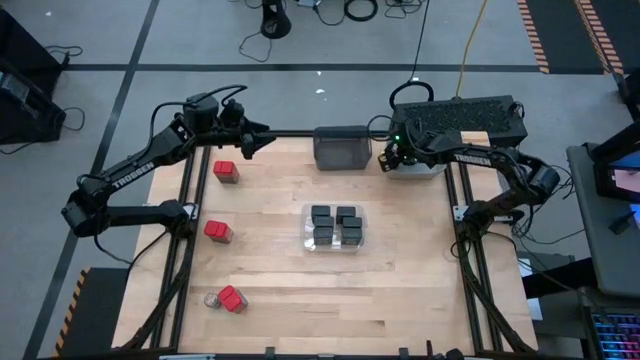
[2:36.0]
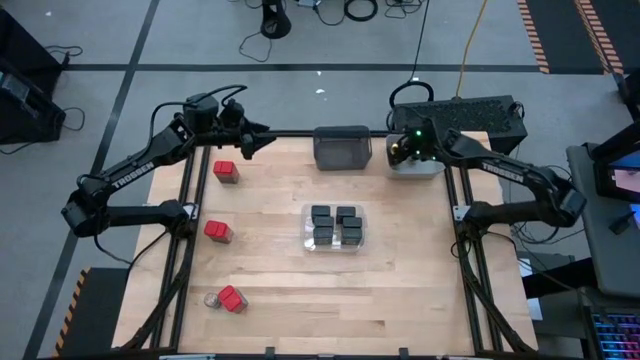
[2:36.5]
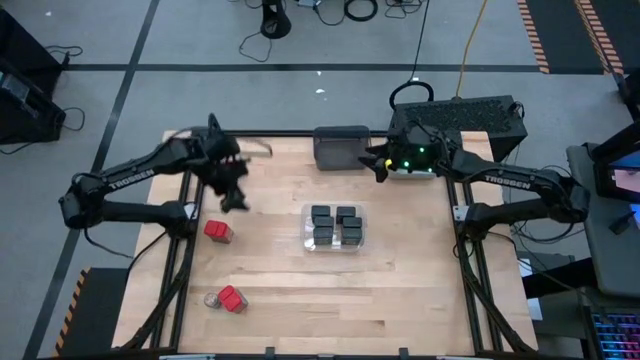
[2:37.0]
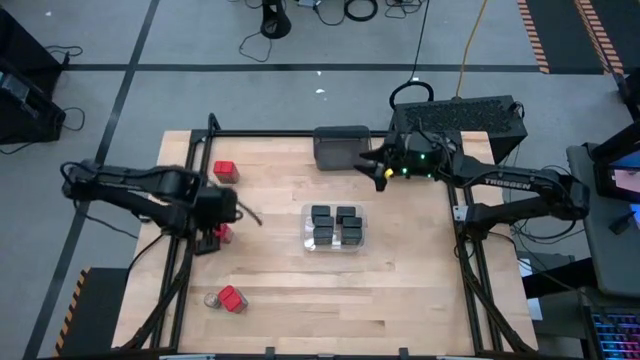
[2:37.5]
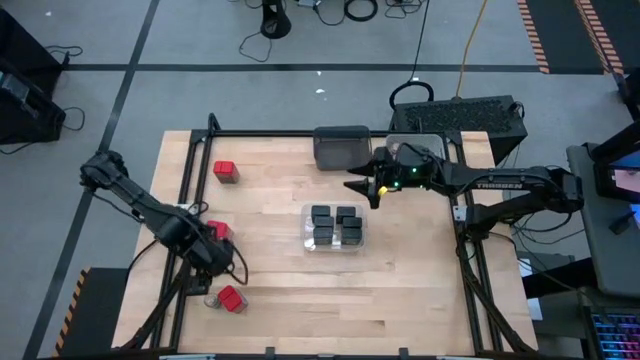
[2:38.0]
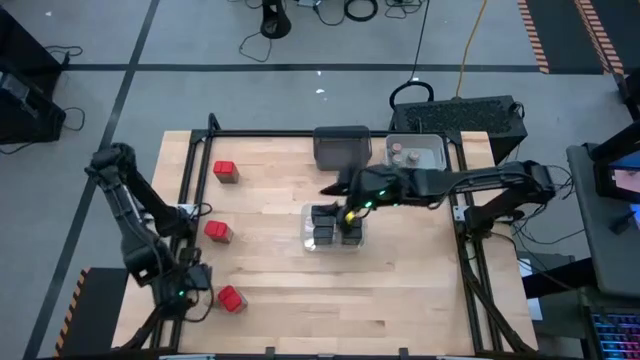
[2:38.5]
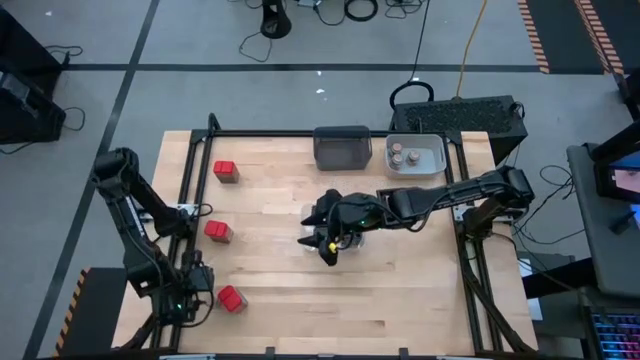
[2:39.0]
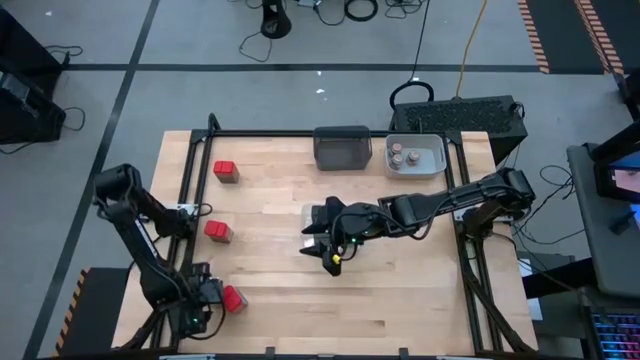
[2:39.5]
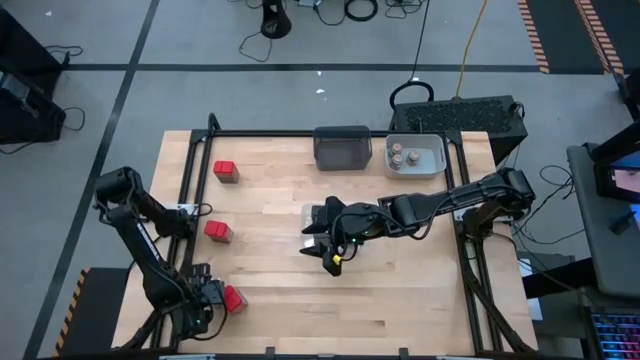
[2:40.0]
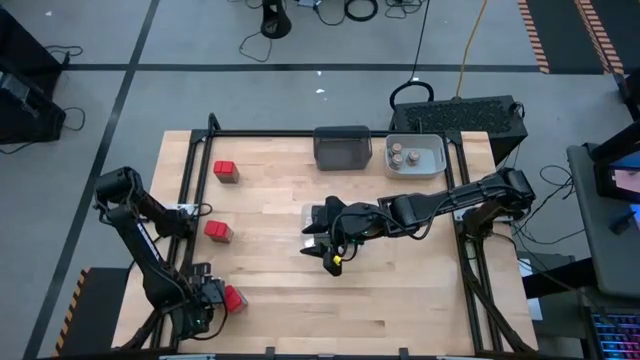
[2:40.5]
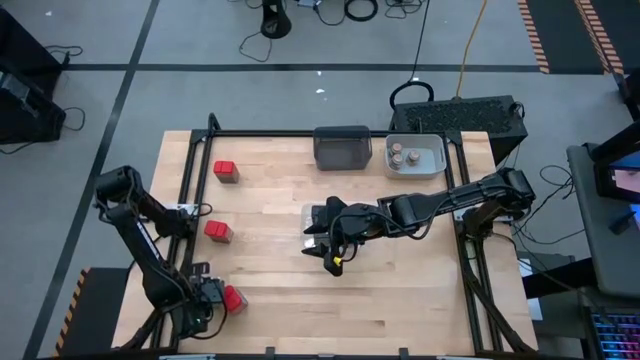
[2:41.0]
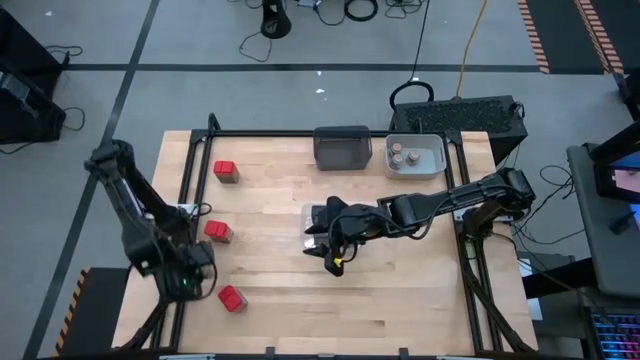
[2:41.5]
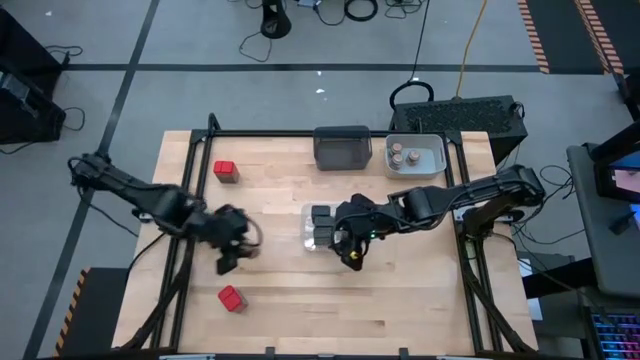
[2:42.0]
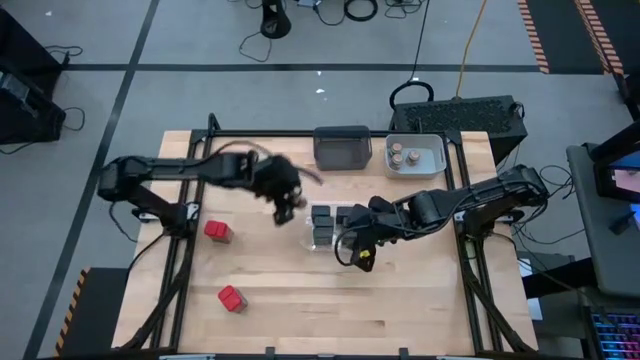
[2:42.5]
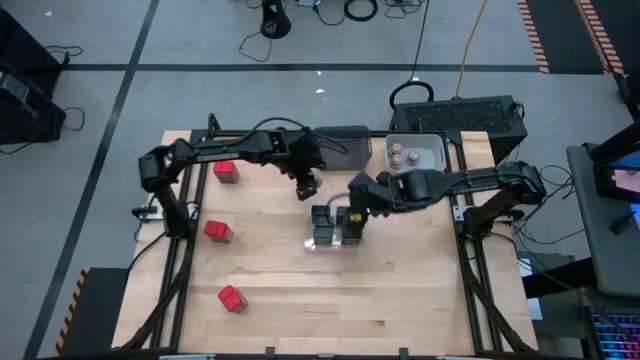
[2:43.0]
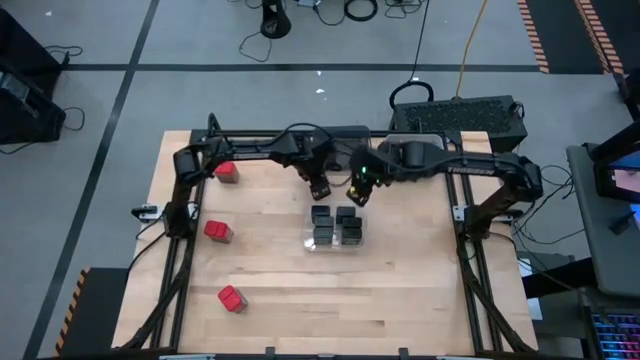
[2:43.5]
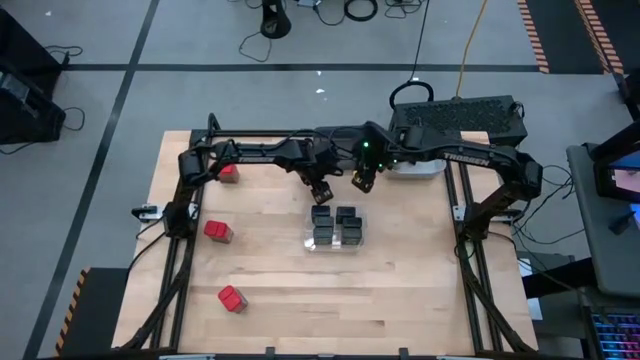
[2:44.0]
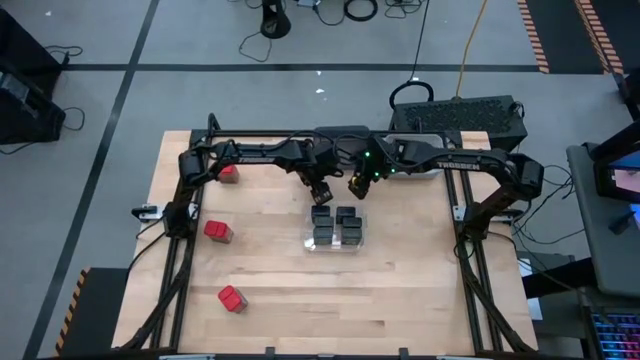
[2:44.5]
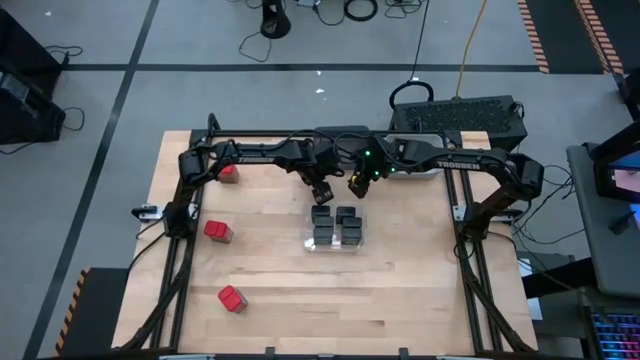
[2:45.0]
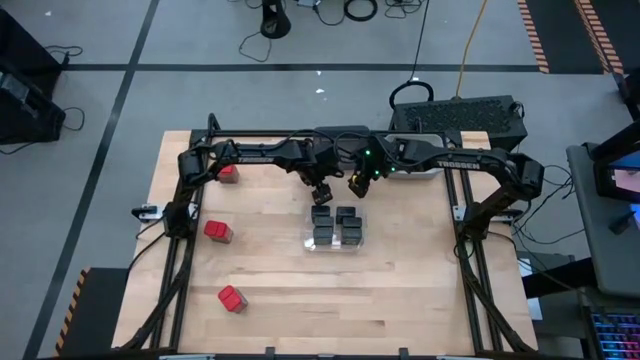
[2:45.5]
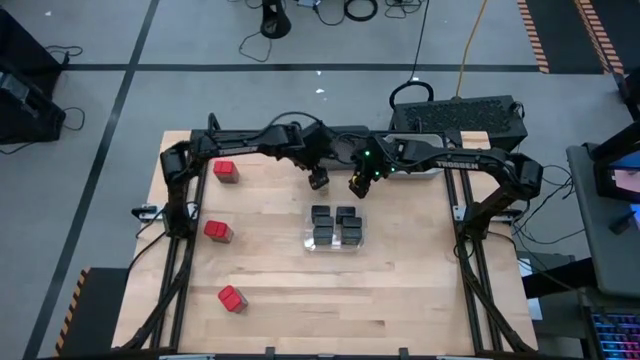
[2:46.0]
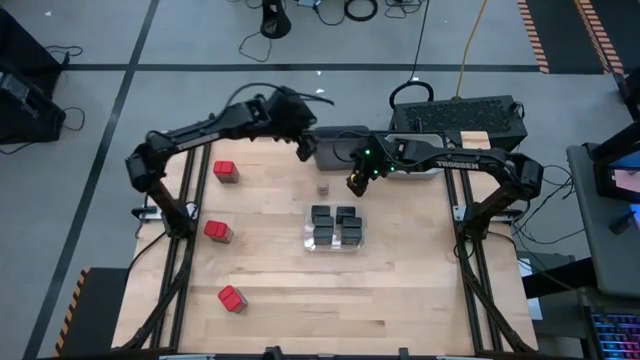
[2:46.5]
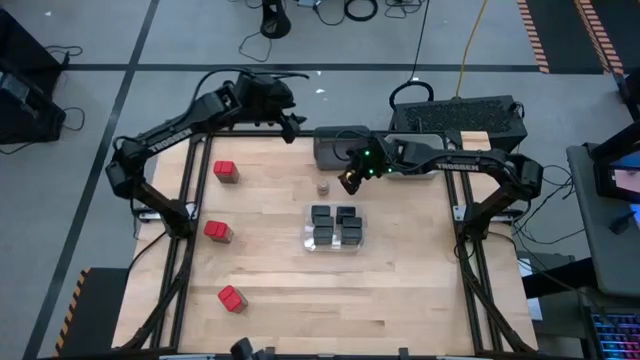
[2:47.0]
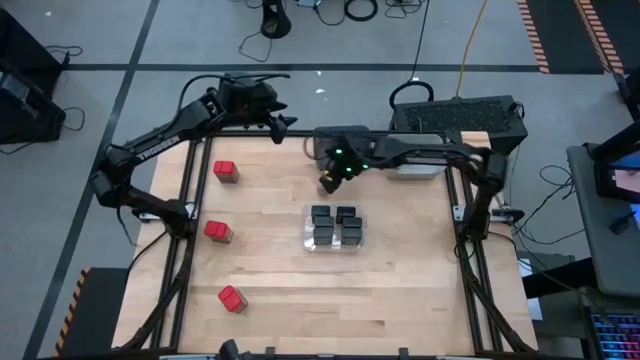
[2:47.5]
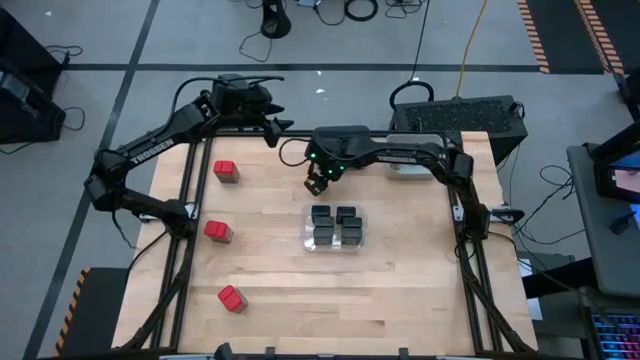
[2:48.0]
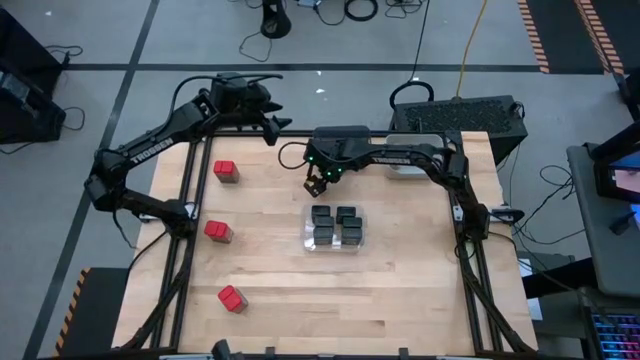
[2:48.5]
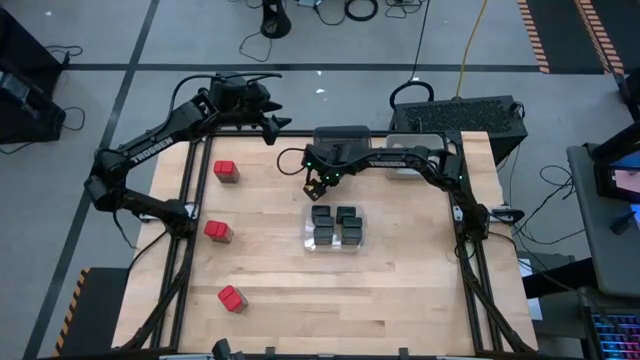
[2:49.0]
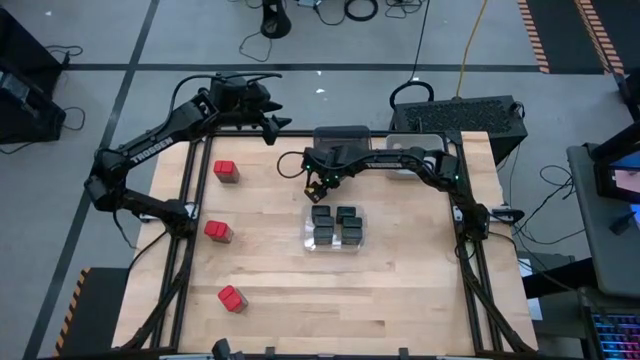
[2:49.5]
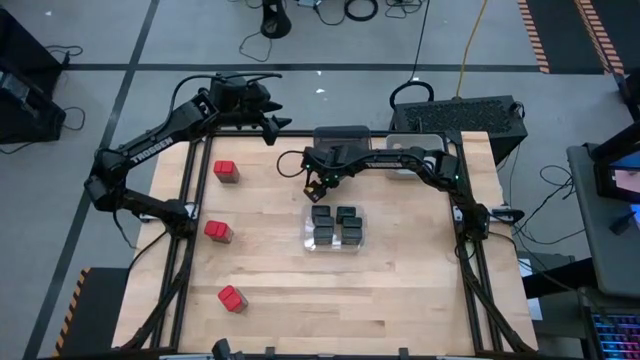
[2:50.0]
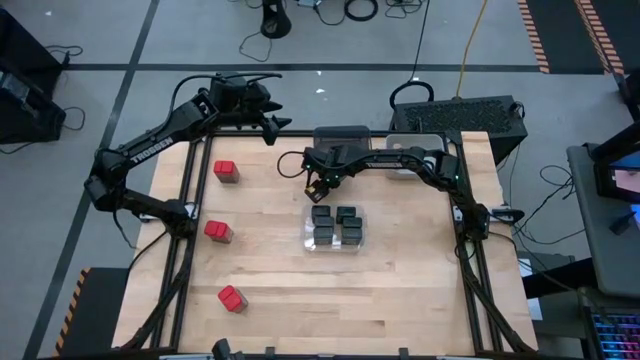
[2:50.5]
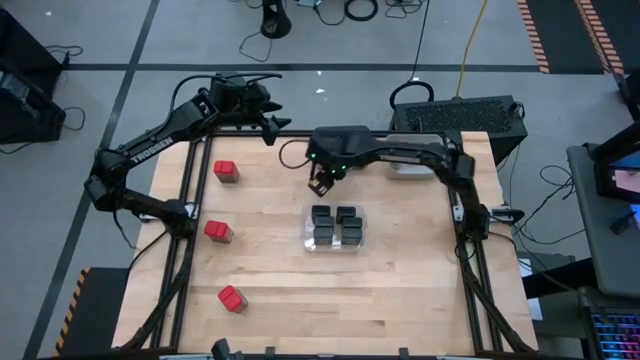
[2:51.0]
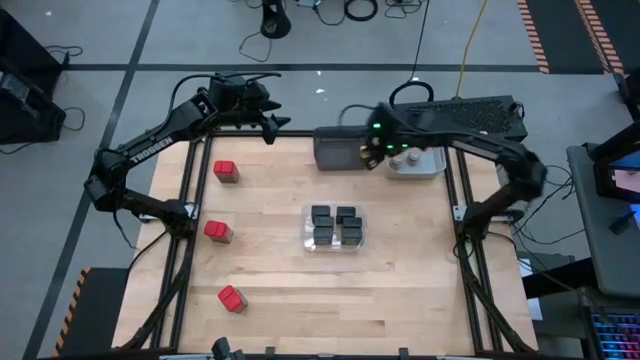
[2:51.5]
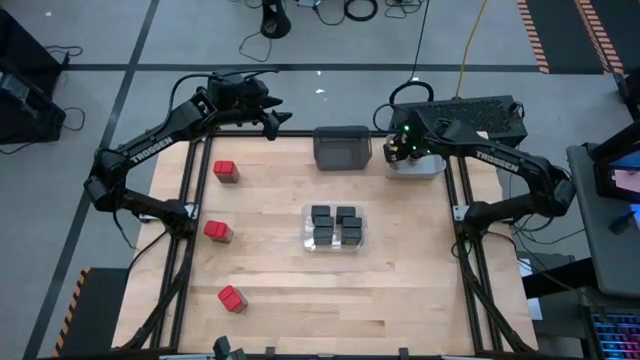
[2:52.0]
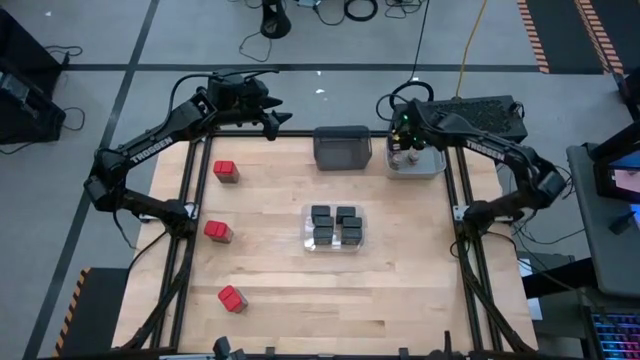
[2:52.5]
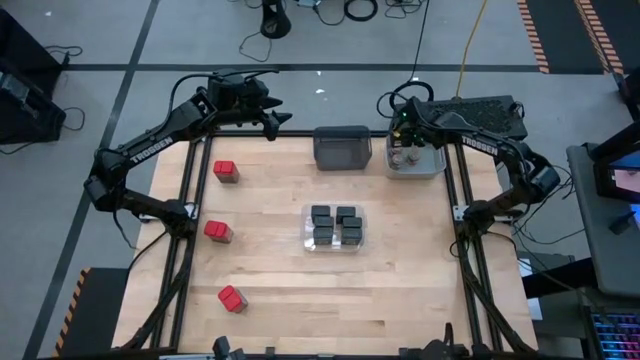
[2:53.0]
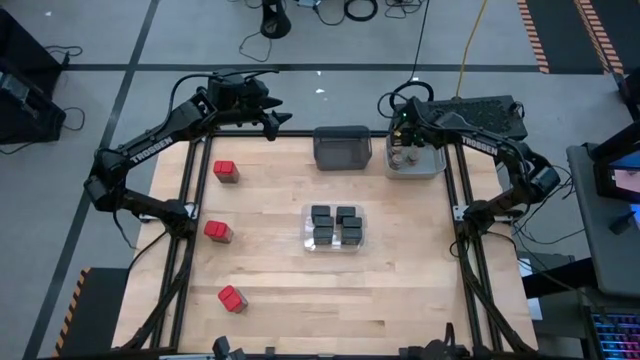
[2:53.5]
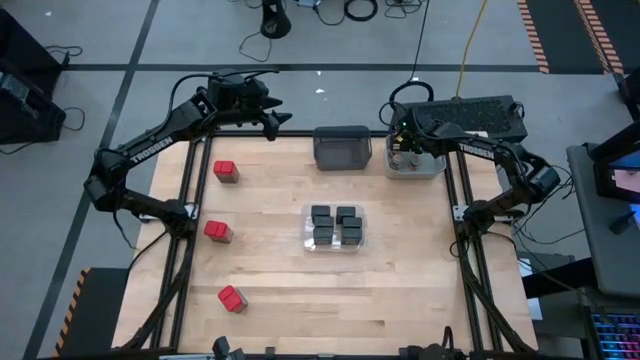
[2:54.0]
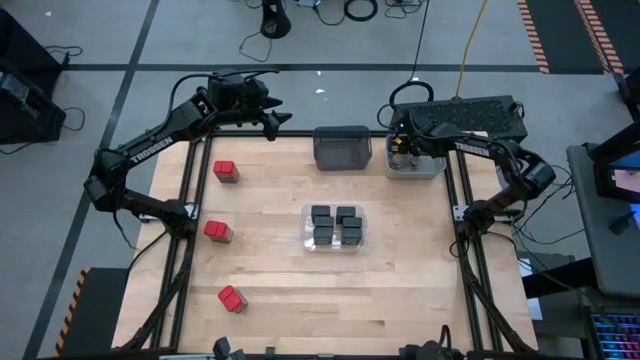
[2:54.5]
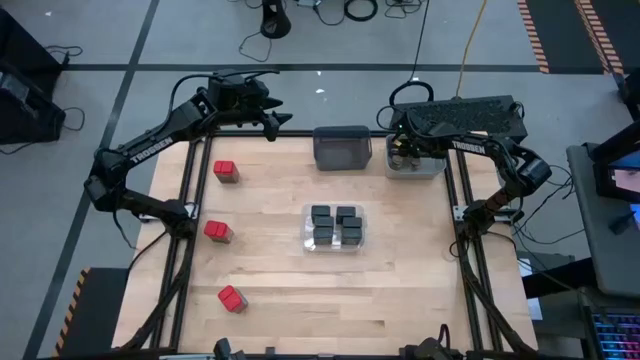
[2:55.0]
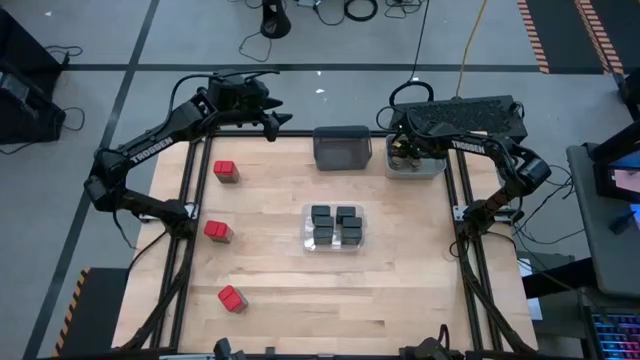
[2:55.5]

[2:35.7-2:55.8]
Task: Sort spices by type
Put the brown seasoning into the gray bin

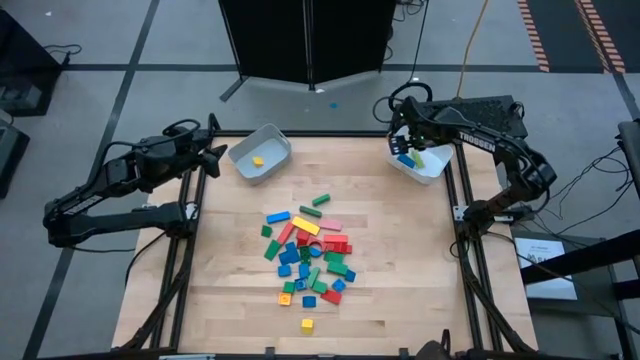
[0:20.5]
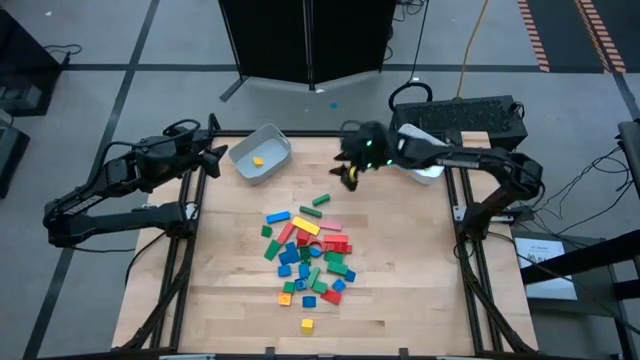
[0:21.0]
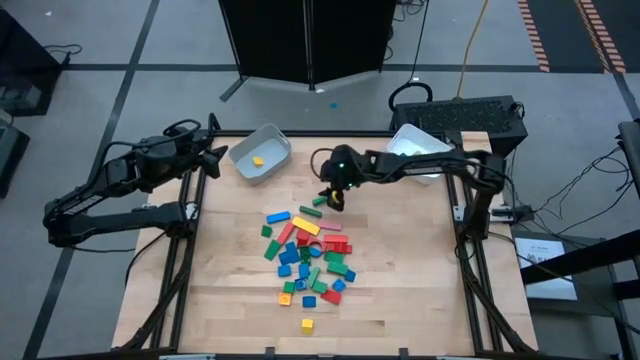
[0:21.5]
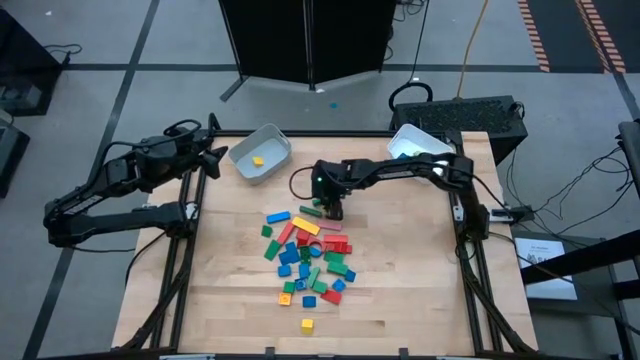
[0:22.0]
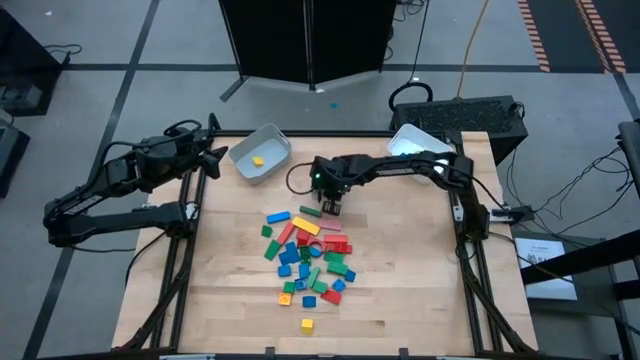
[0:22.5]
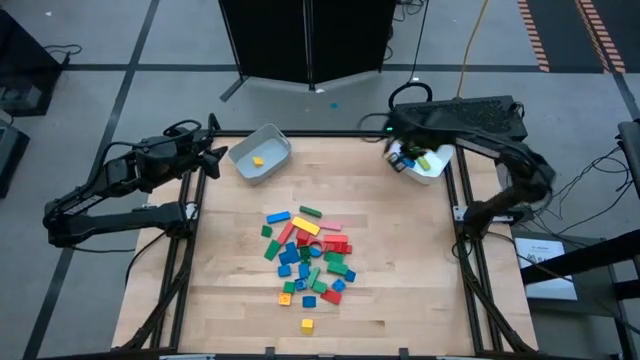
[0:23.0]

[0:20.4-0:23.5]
Task: Sort blocks by size
Put the rectangular green block into the white bin
